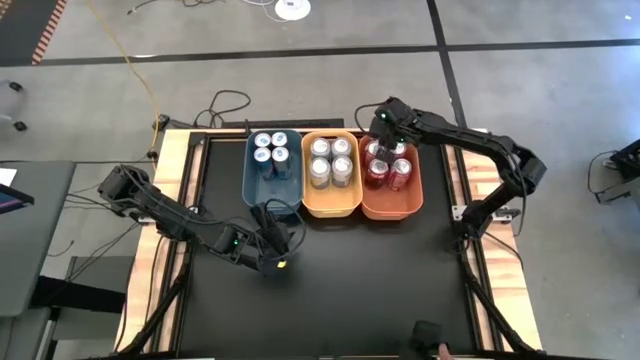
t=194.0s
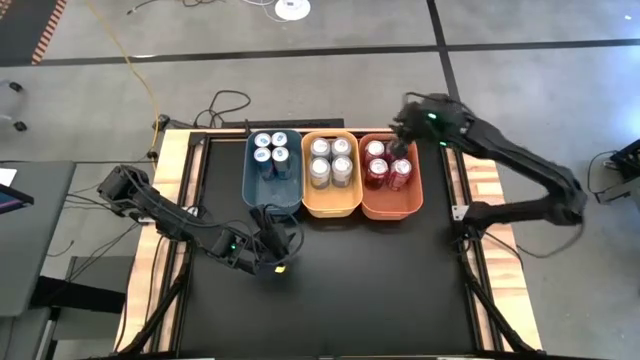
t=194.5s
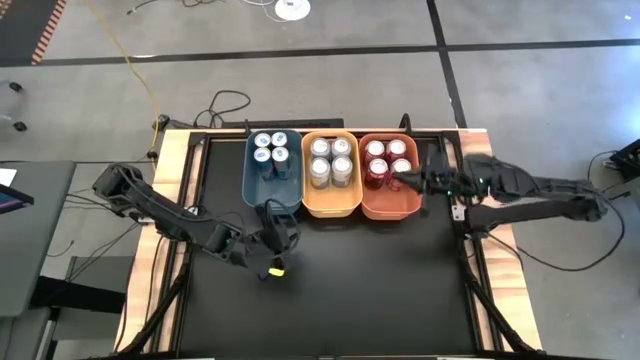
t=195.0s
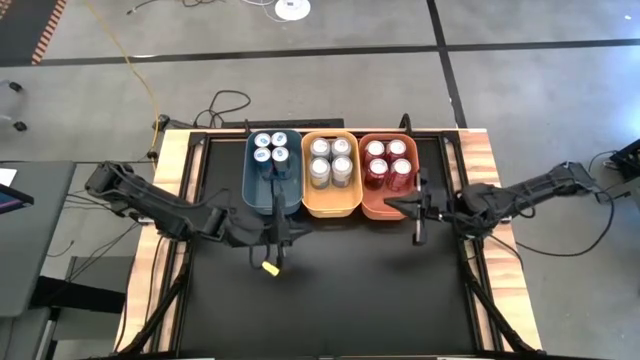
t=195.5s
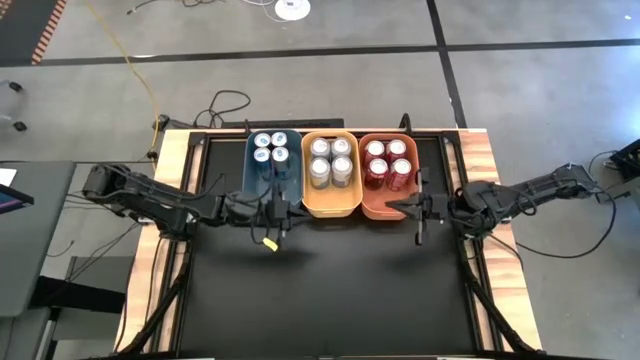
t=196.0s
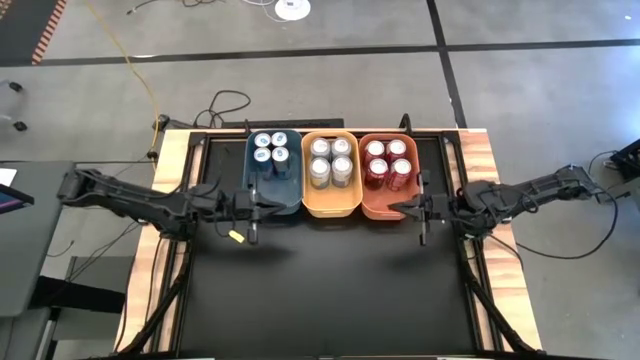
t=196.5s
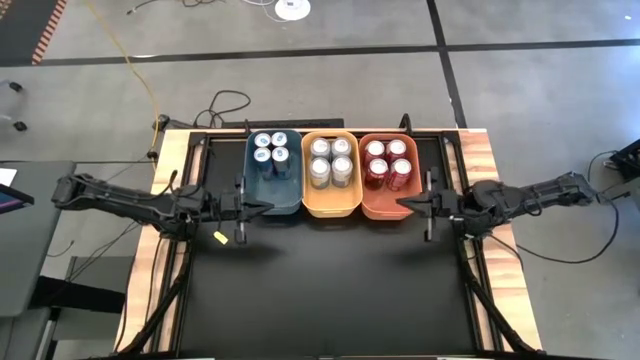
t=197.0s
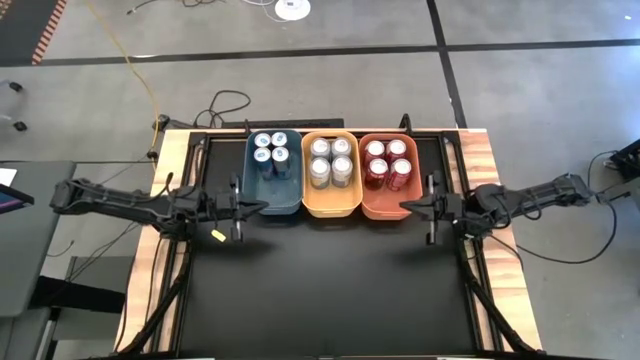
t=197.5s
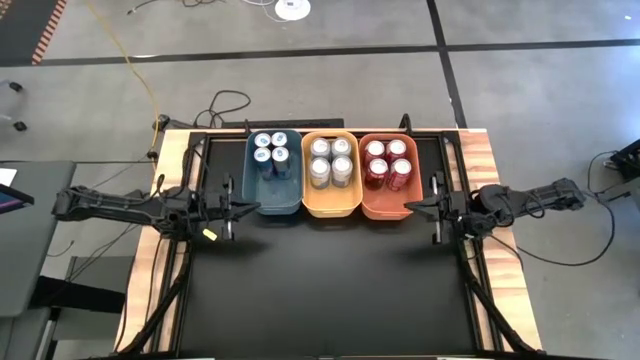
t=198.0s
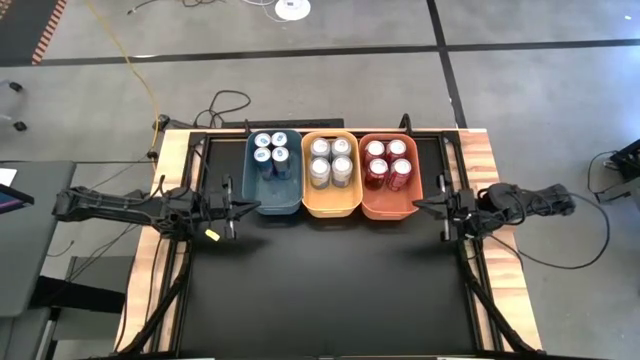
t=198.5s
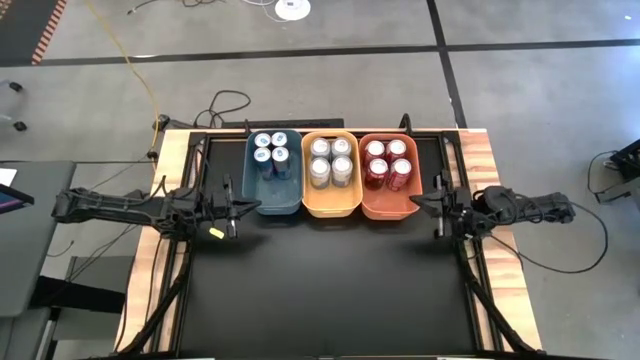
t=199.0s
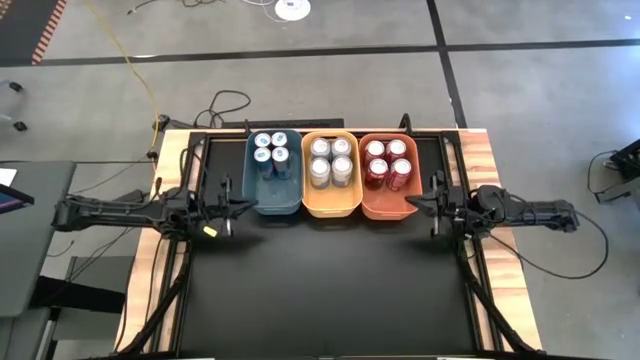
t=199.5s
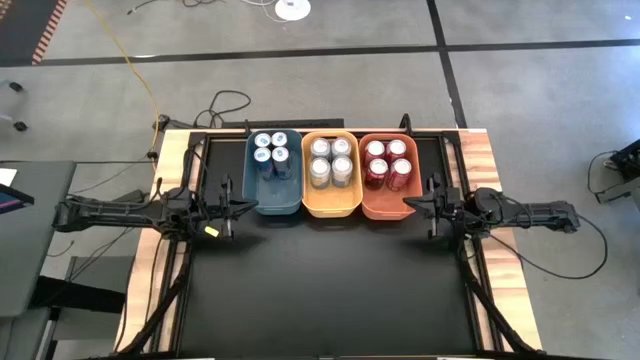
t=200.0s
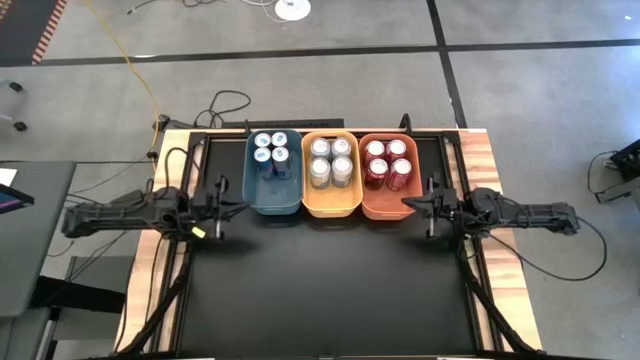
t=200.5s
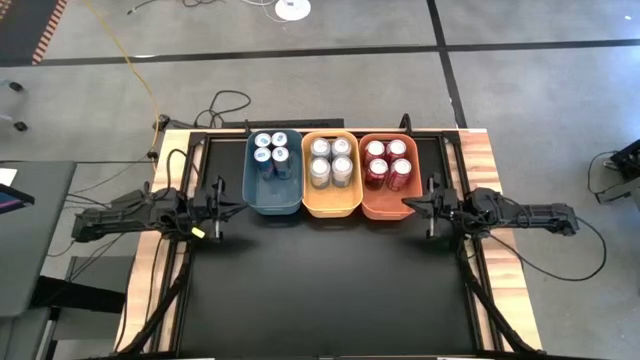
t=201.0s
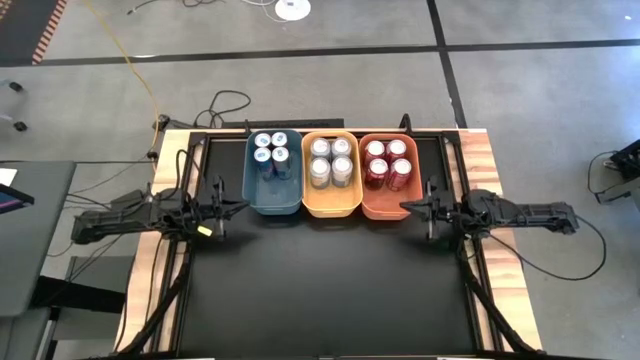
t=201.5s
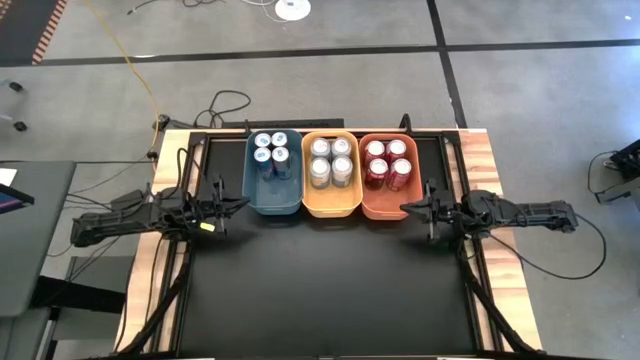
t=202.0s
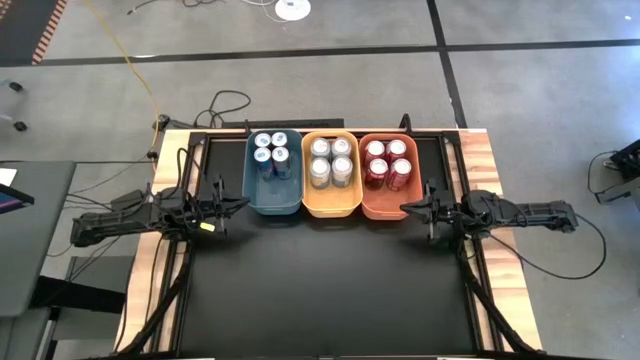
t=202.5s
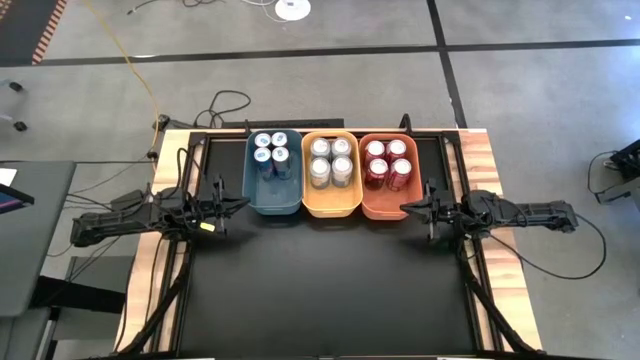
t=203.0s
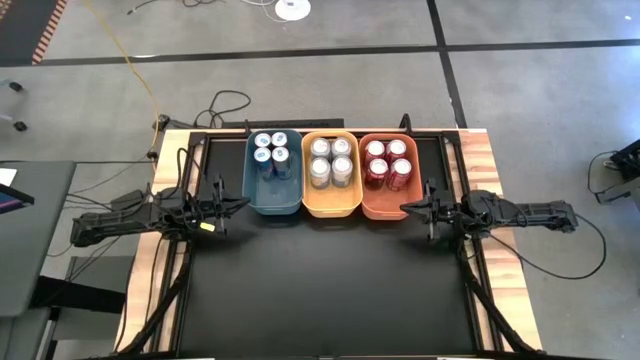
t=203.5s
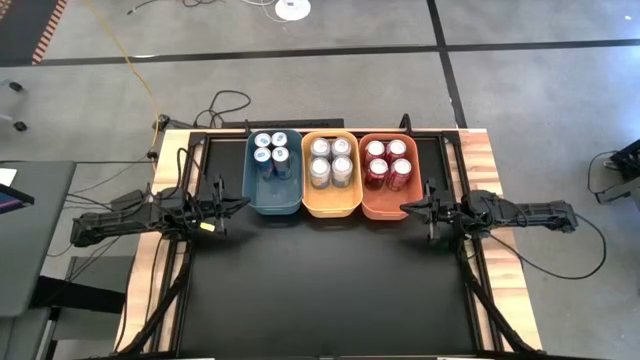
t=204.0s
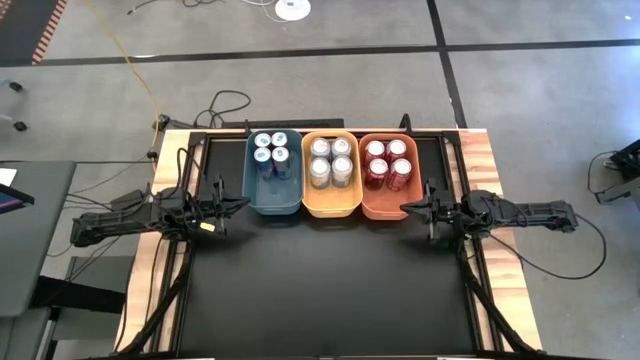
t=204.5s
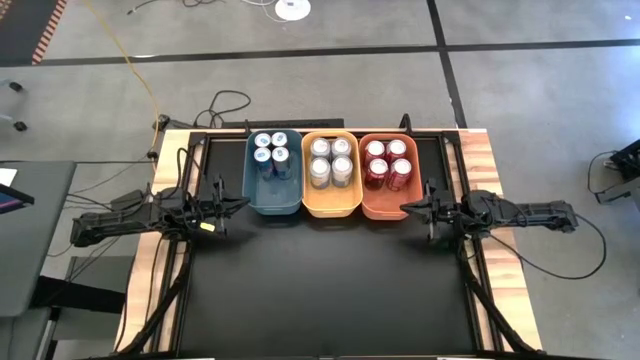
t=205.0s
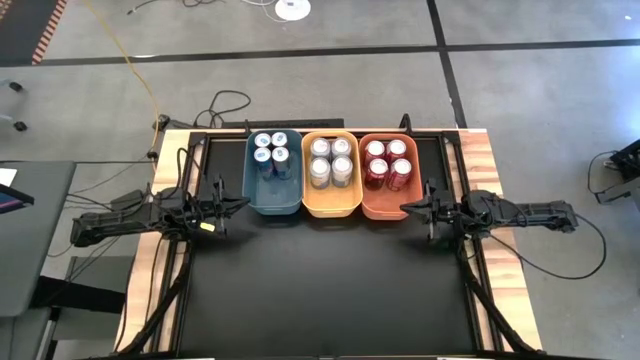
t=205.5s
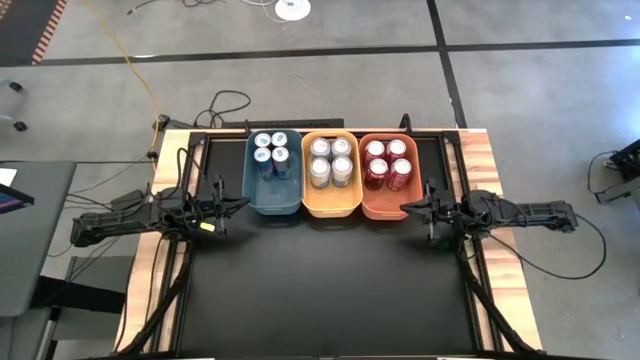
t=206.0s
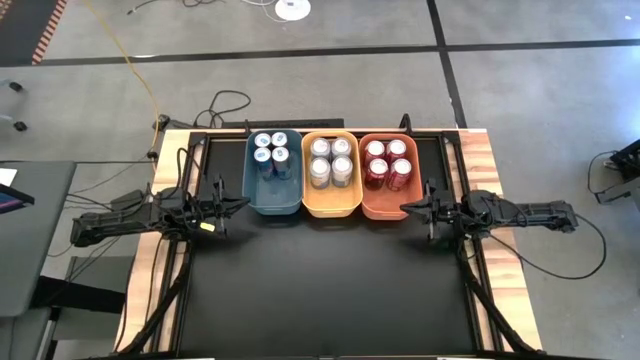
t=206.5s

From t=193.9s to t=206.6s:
Task: Sort soda cans
Return to Home Position

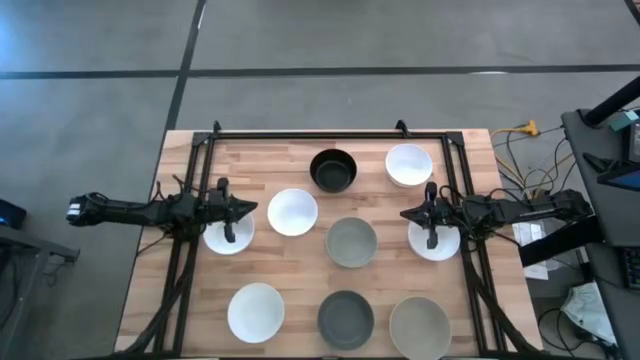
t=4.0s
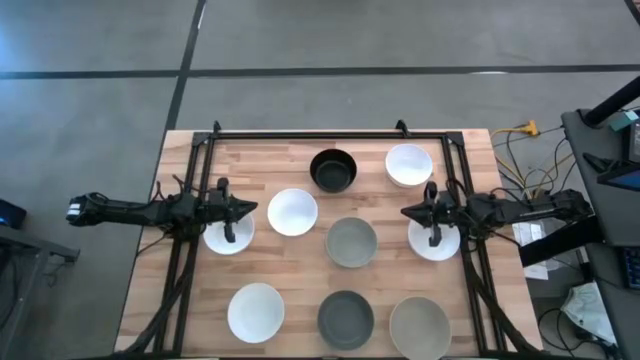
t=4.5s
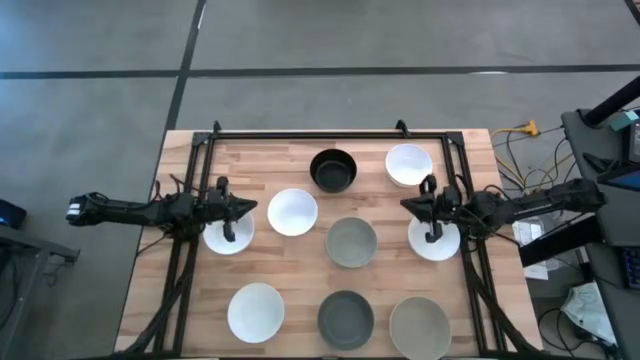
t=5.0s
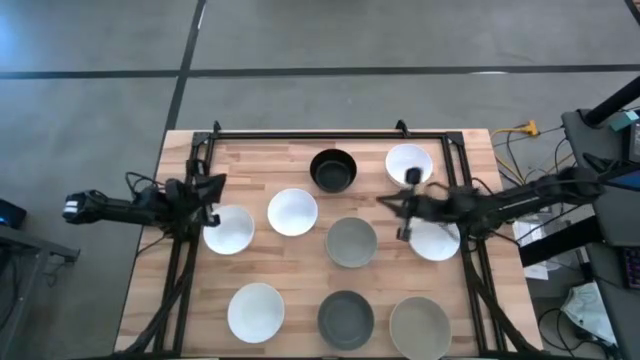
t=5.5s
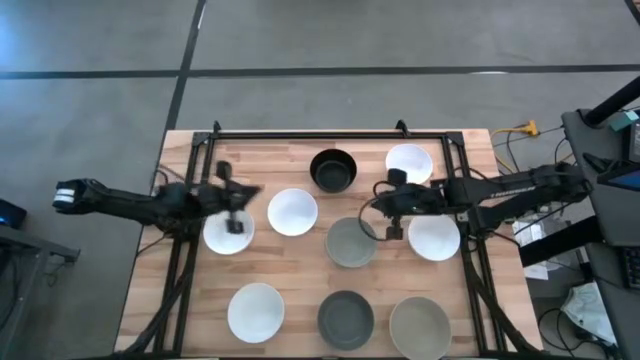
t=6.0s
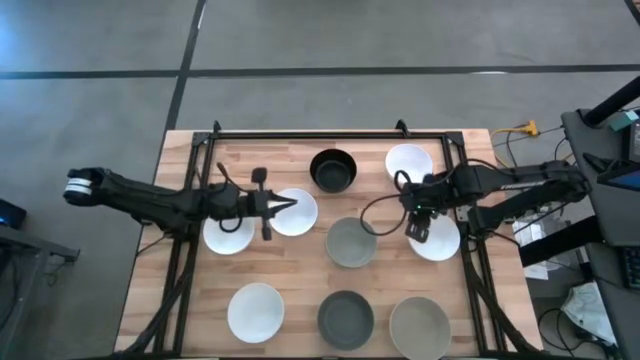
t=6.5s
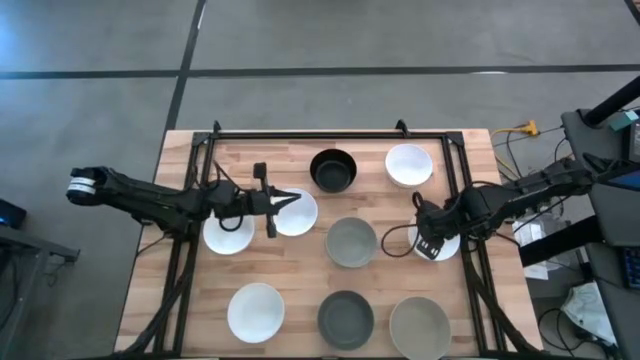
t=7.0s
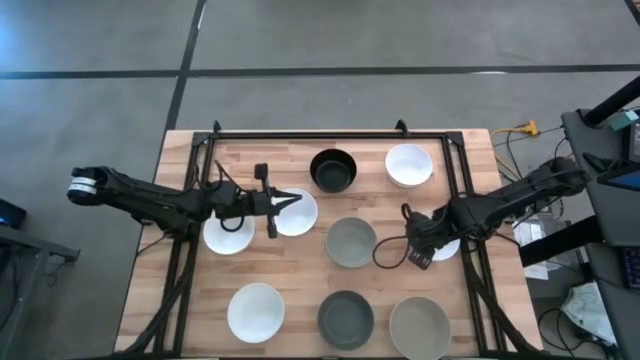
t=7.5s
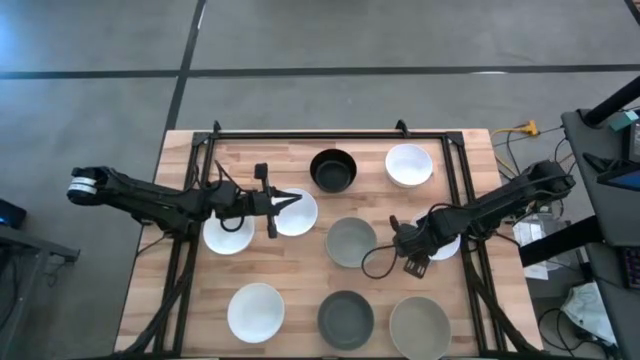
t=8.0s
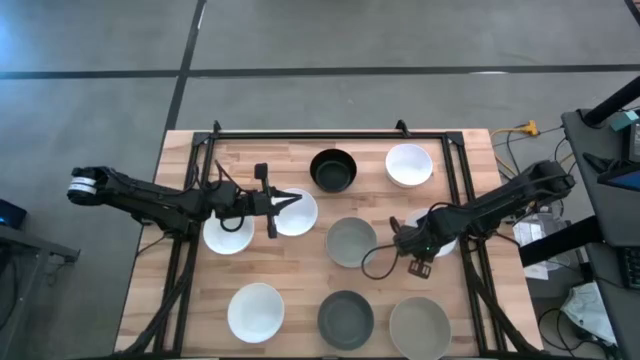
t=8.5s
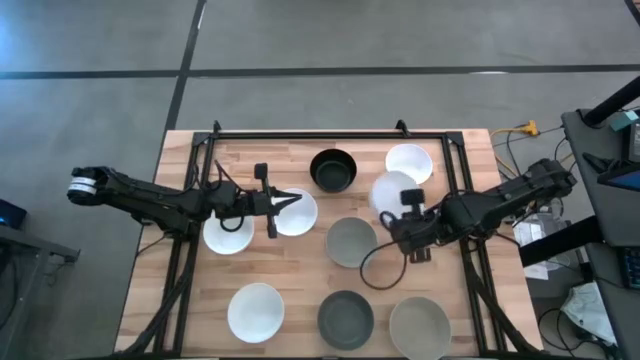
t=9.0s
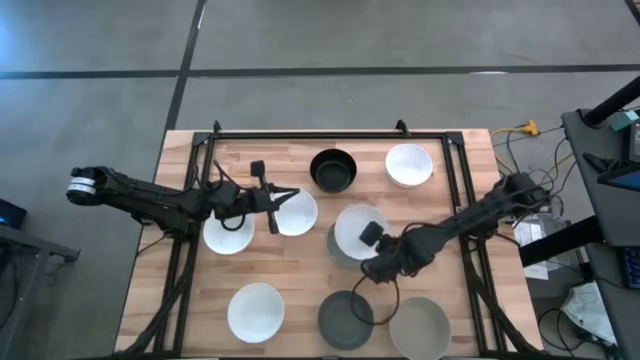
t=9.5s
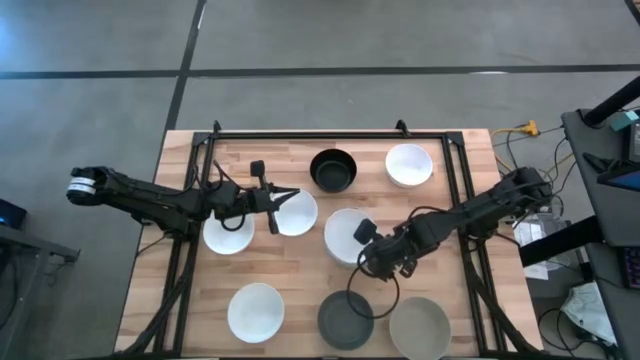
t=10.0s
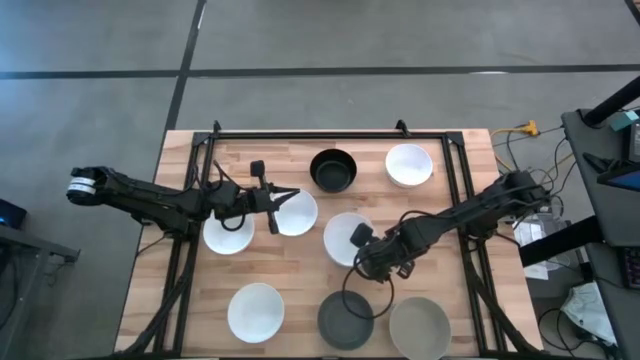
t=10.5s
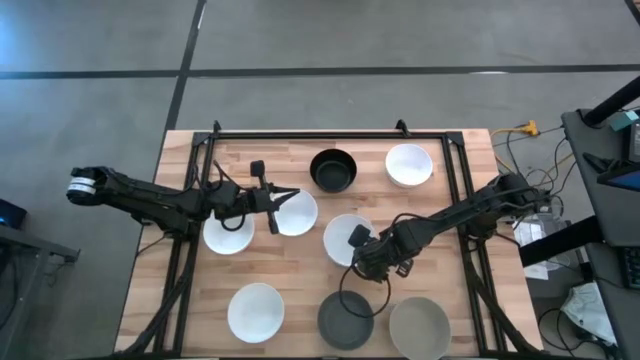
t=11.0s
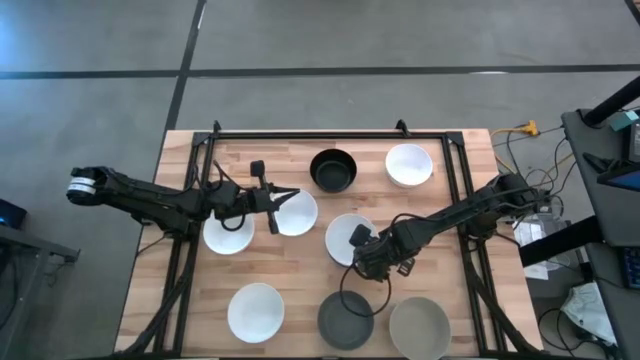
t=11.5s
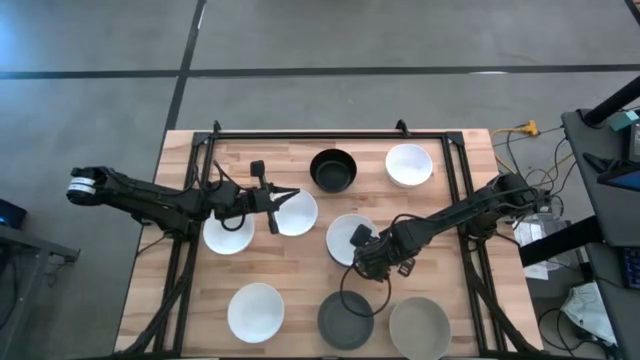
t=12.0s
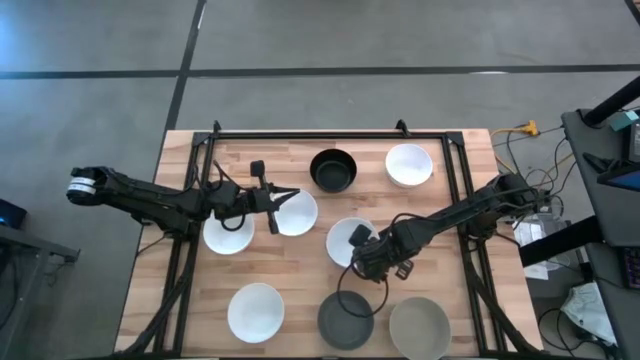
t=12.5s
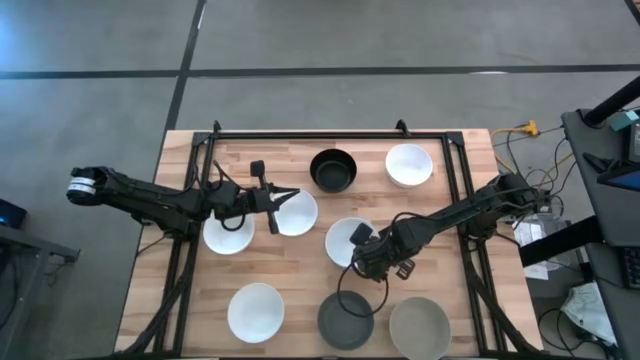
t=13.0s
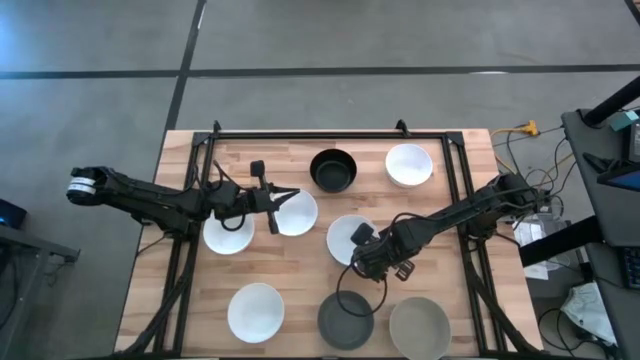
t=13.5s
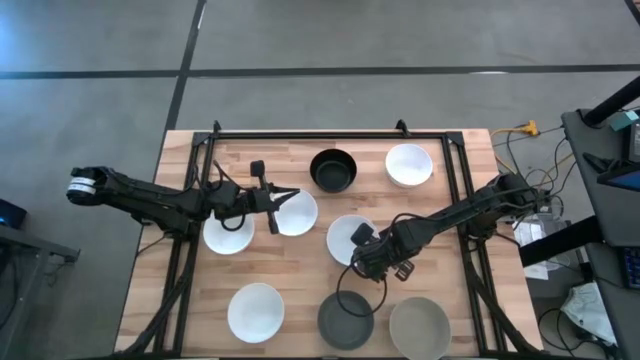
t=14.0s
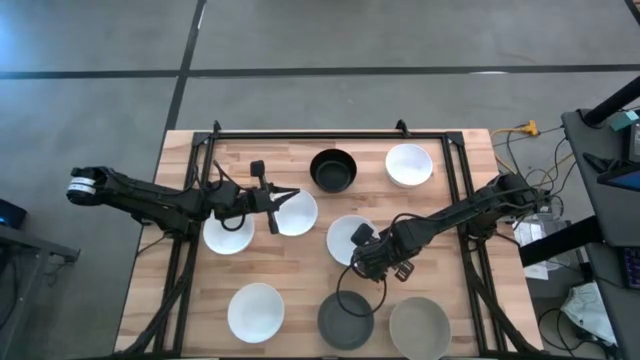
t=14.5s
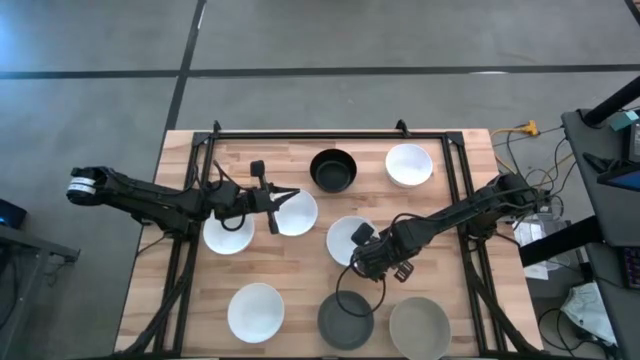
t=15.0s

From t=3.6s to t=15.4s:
Task: Nest bowls inside each other
Stack the white bowl on top of the light gray bowl
